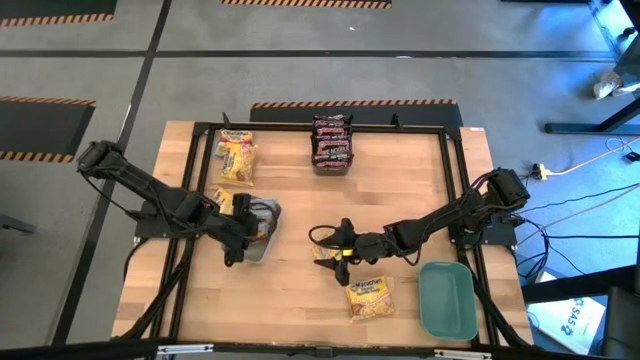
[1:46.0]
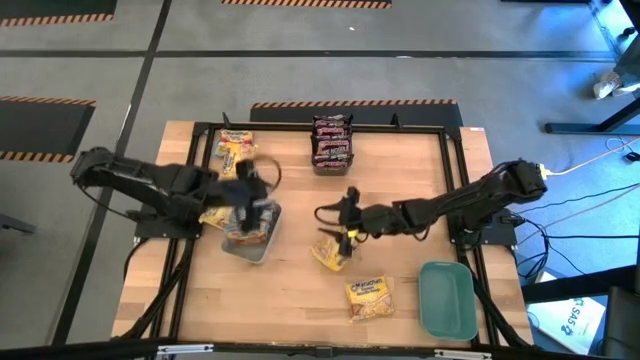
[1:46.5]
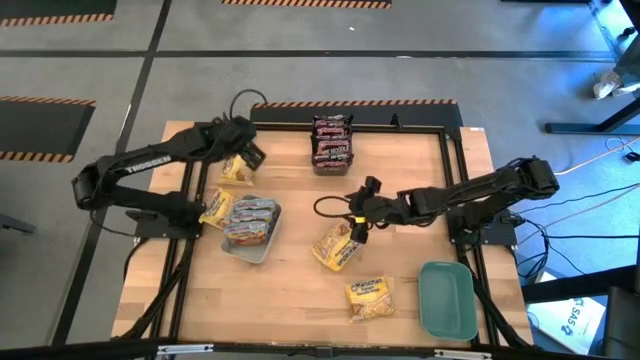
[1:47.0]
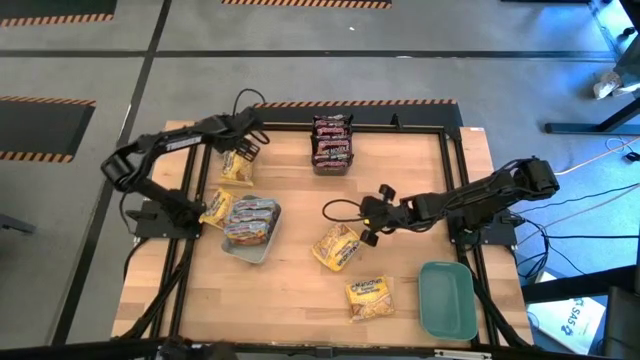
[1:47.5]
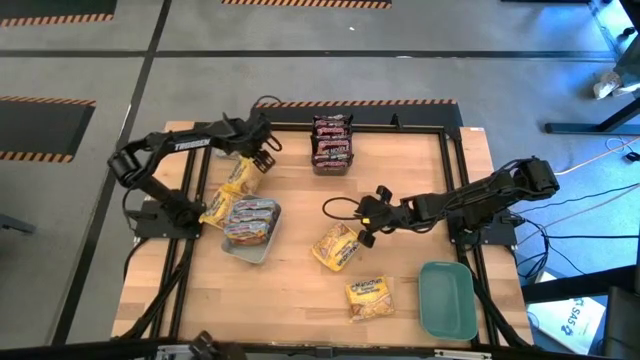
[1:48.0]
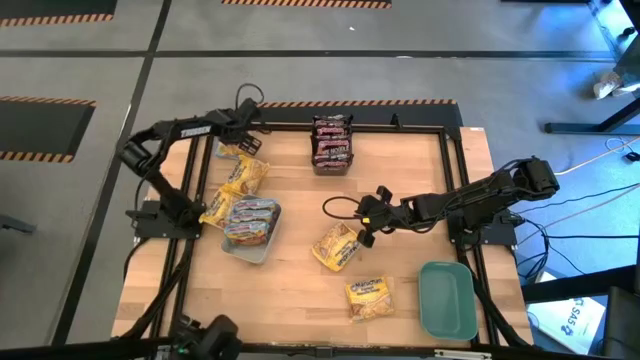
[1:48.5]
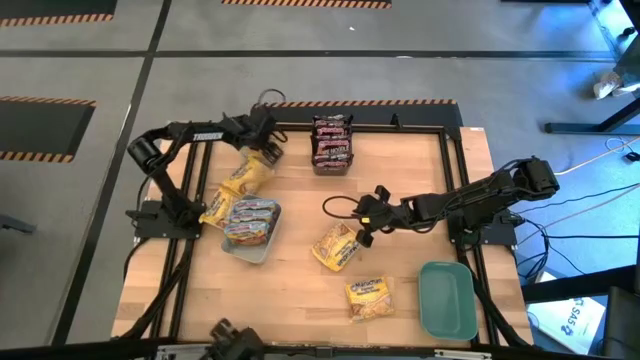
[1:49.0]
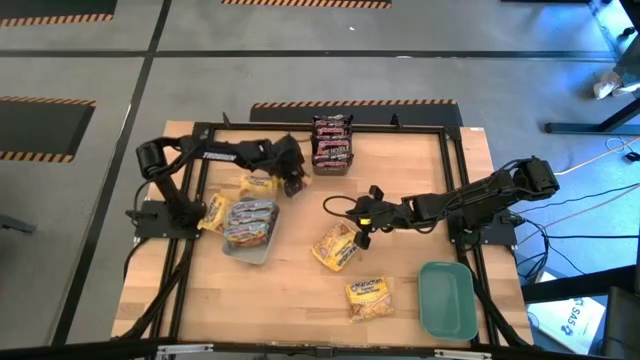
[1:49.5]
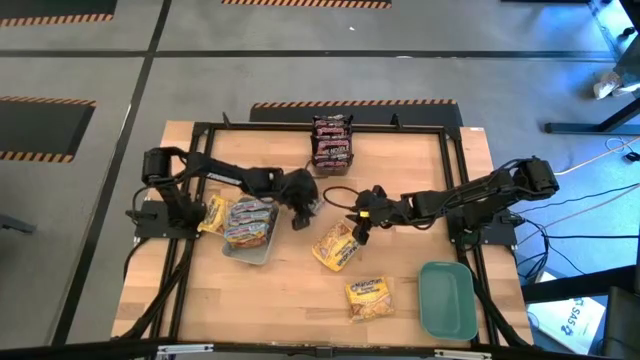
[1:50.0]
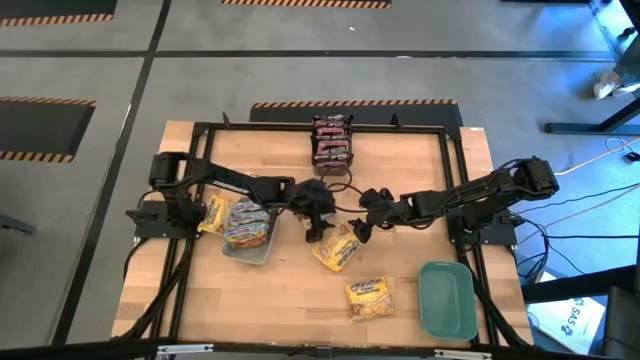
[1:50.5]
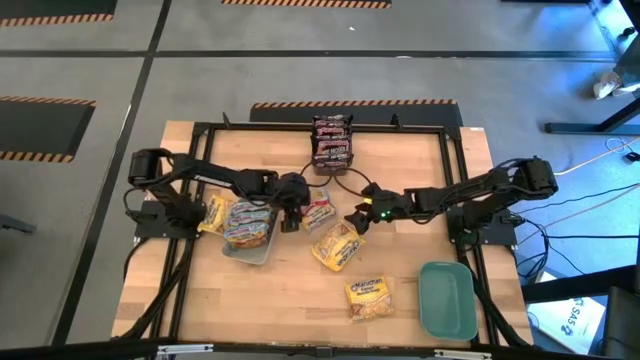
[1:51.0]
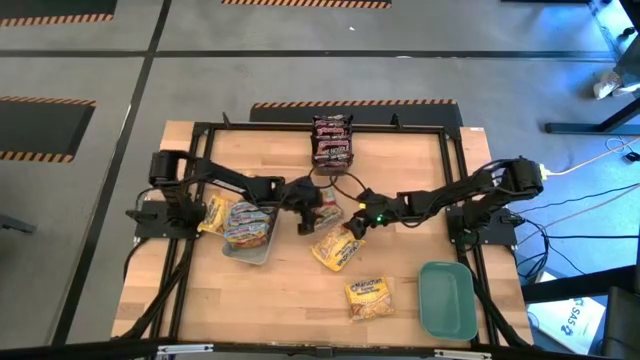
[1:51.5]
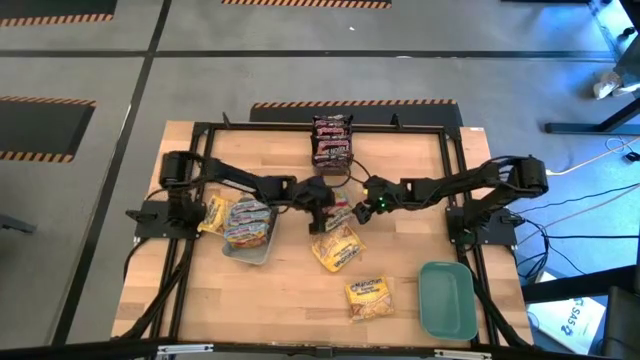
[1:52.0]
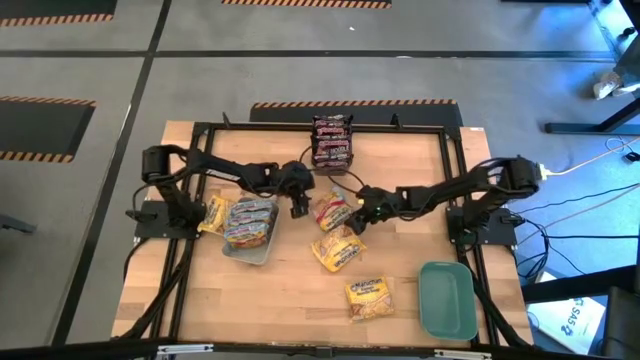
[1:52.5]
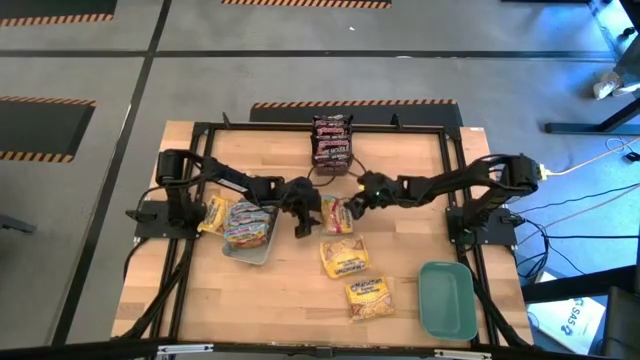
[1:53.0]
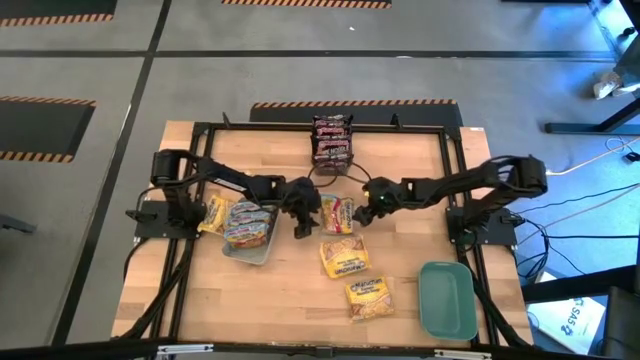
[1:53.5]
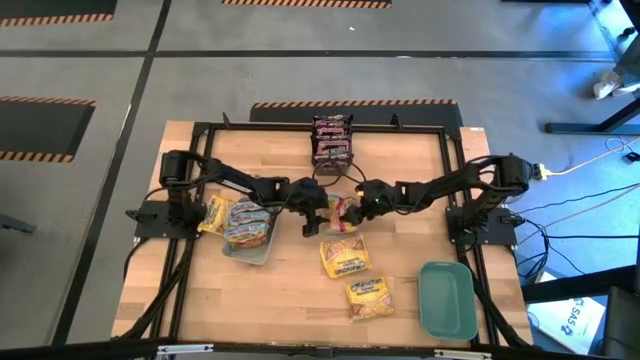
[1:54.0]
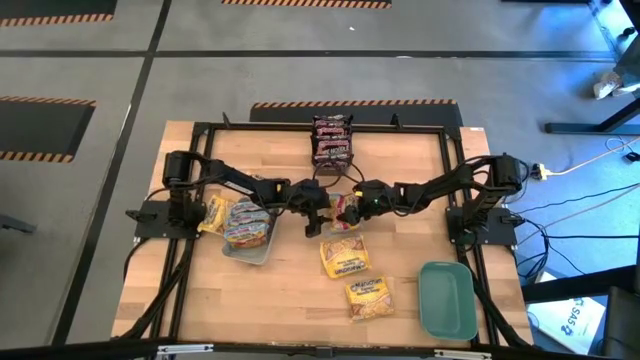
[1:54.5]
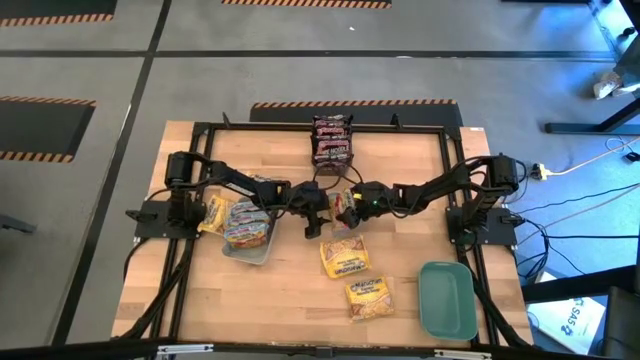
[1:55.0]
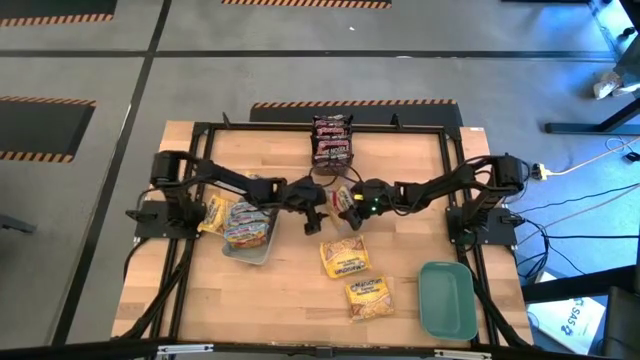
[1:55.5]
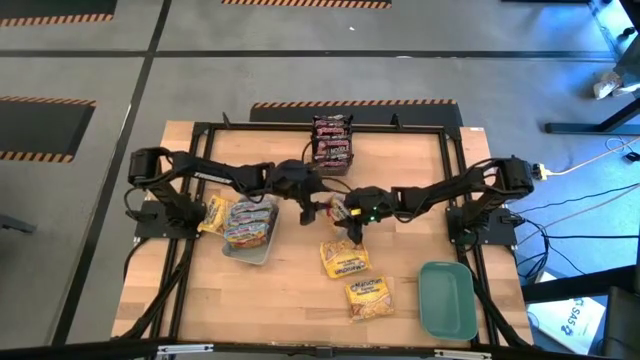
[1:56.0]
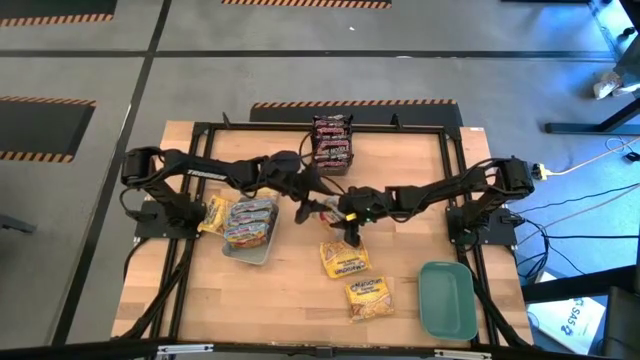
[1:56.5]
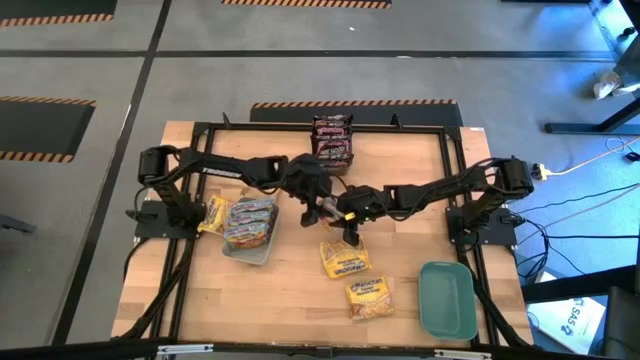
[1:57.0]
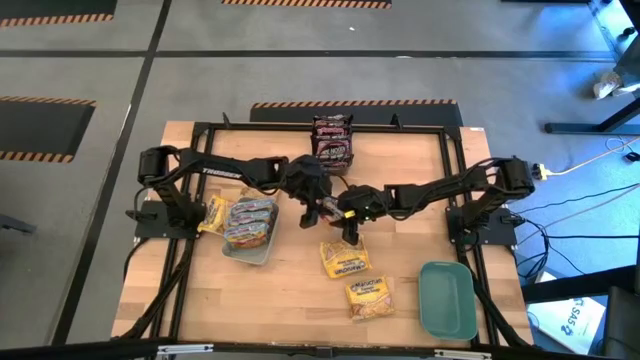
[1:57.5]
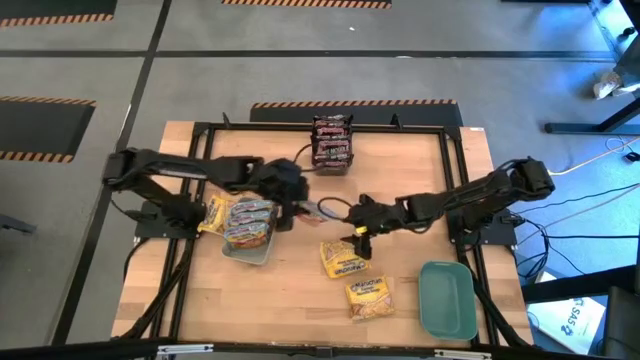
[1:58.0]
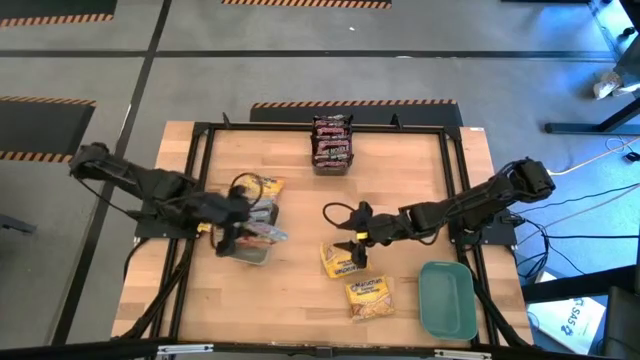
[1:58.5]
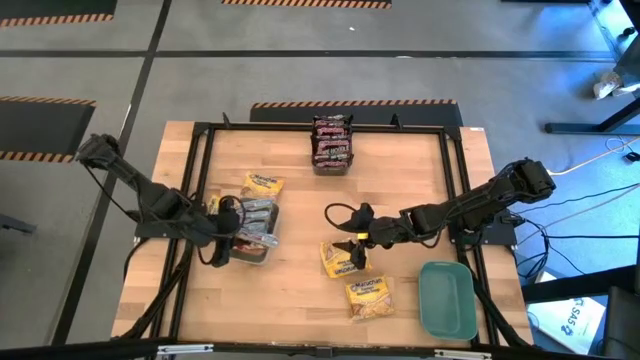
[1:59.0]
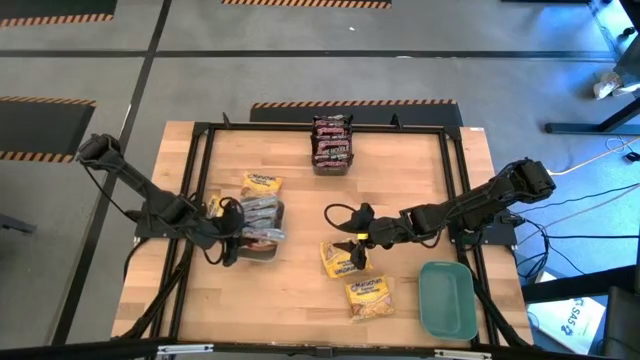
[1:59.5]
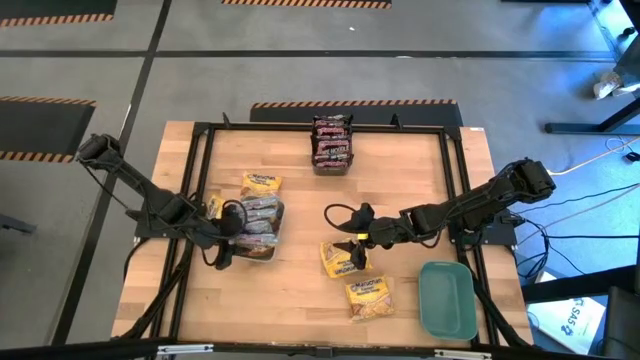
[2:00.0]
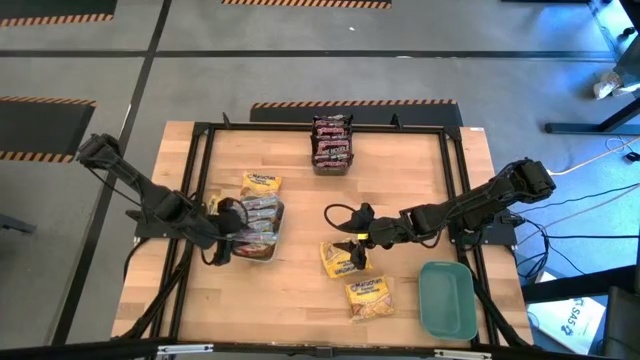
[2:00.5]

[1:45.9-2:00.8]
Task: Sort Maruchan noodles
Put the blue noodle pack into the gray bin

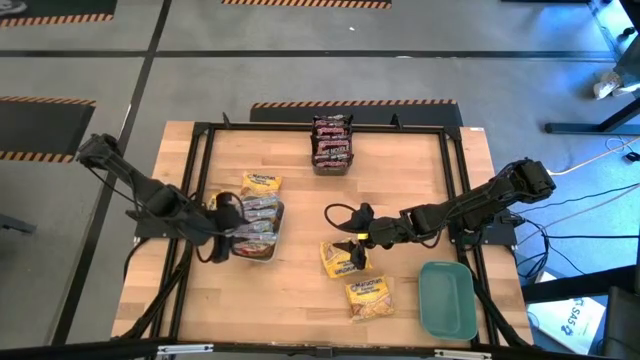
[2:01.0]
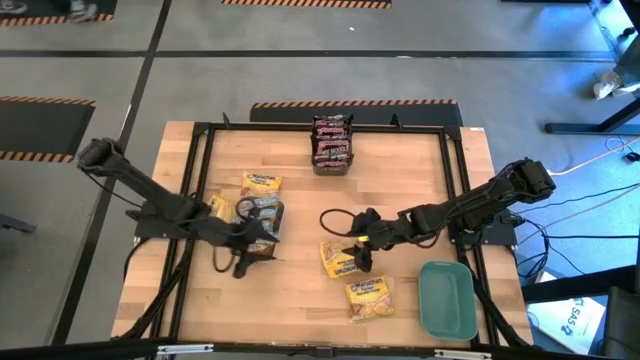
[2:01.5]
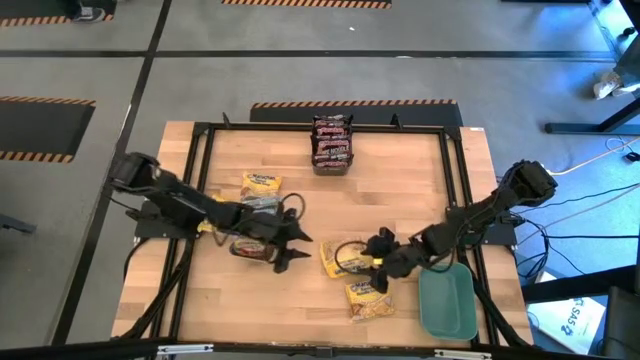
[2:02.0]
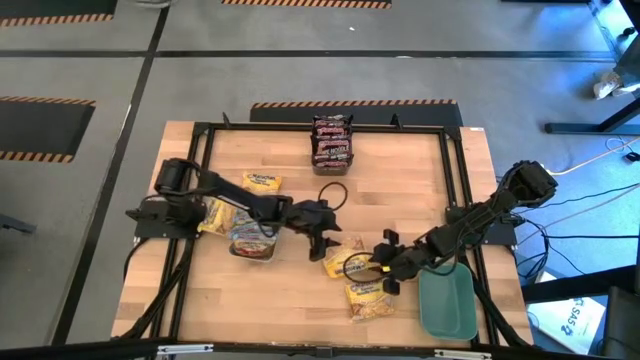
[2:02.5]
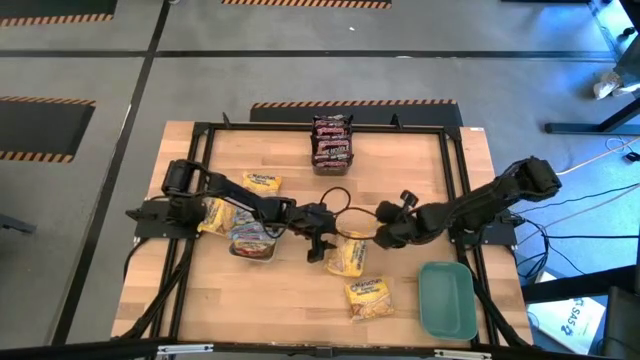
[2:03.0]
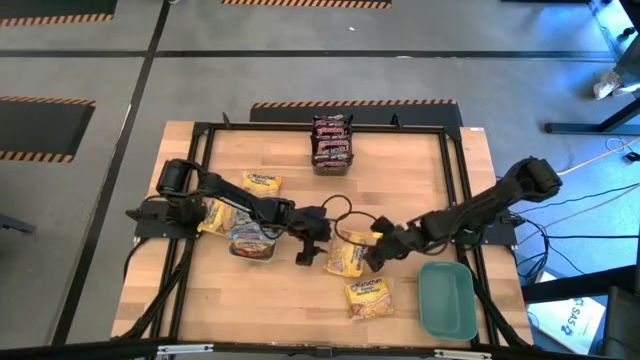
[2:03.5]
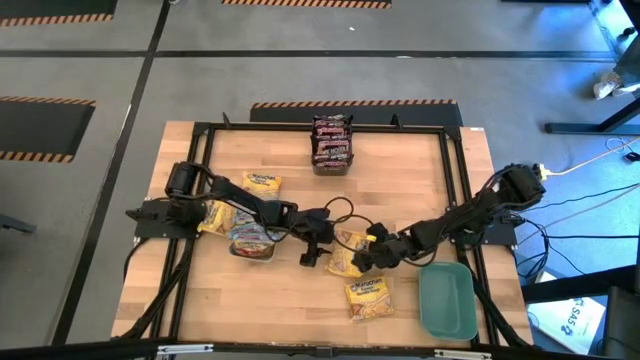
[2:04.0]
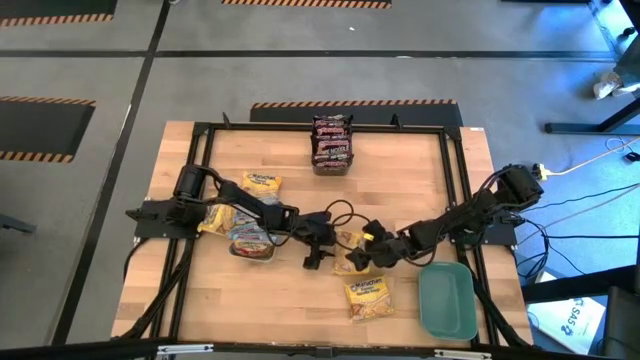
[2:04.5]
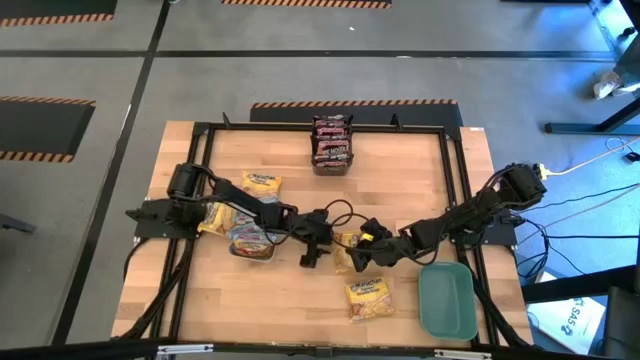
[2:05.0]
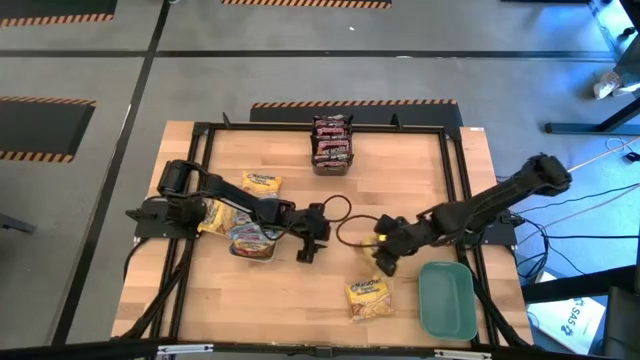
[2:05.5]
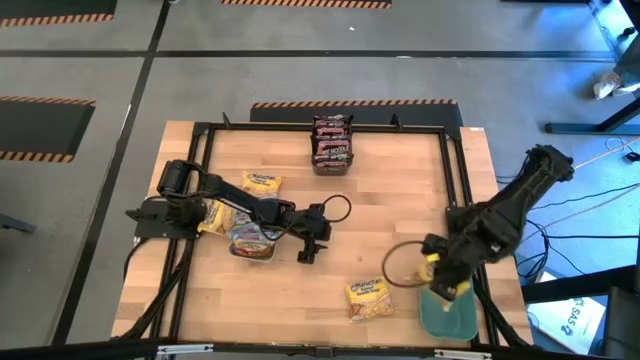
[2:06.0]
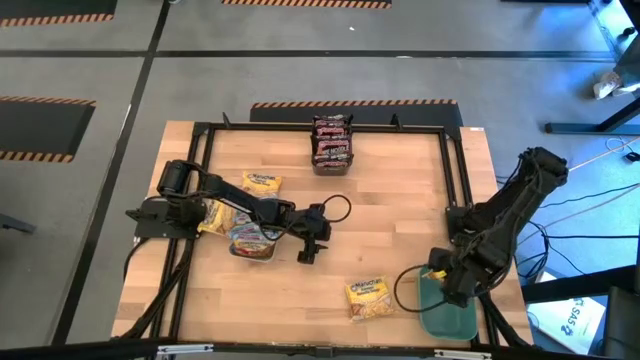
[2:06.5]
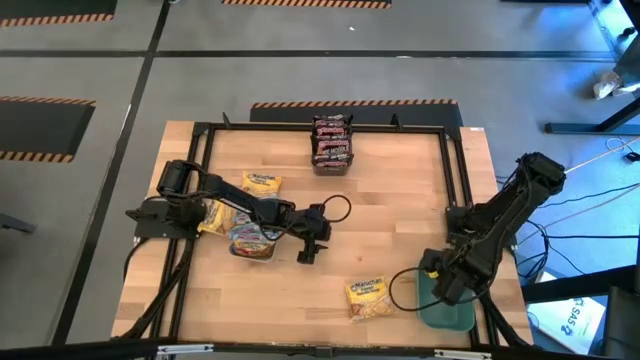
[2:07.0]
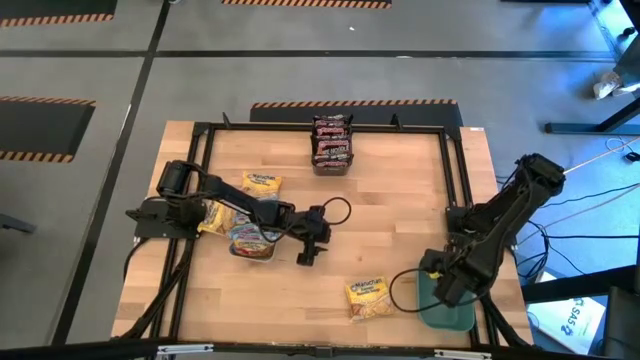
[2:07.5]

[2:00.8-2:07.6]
Put the middle bottom yellow noodle pack into the green bin
